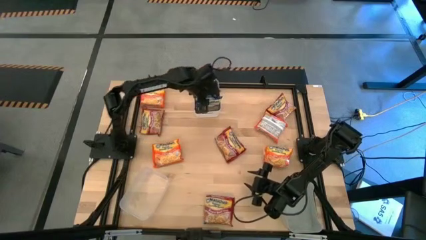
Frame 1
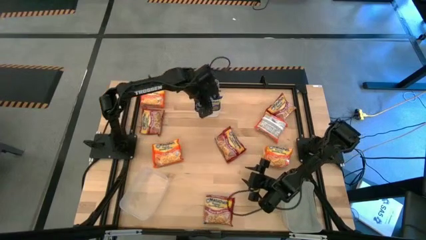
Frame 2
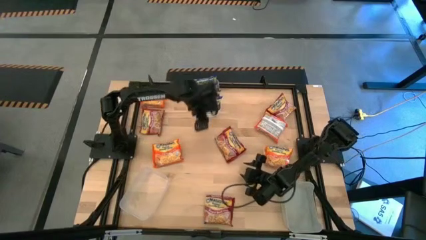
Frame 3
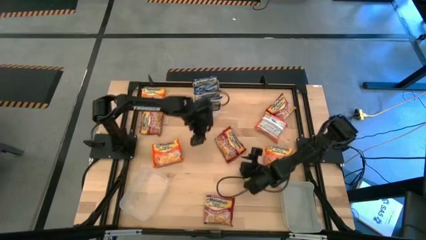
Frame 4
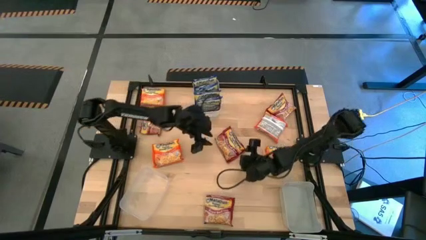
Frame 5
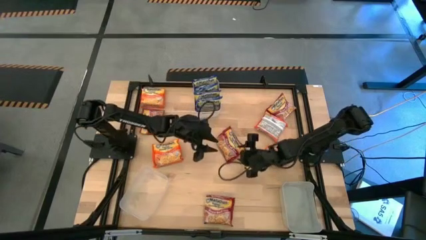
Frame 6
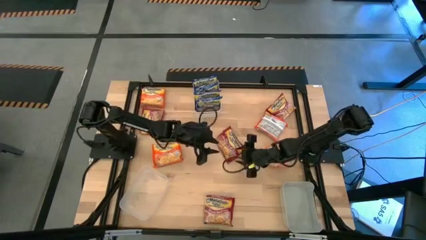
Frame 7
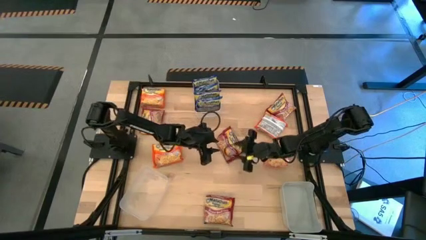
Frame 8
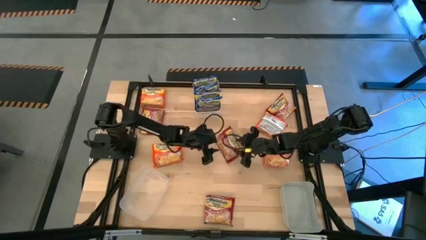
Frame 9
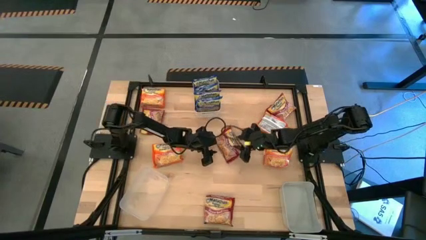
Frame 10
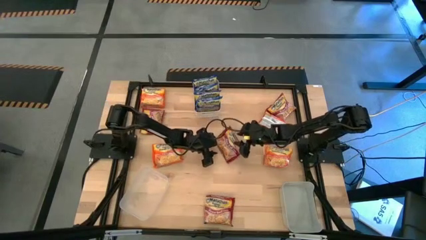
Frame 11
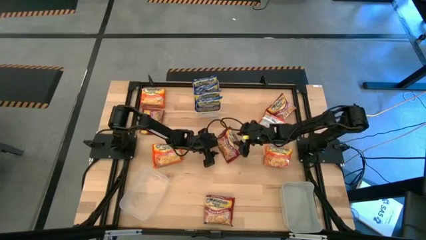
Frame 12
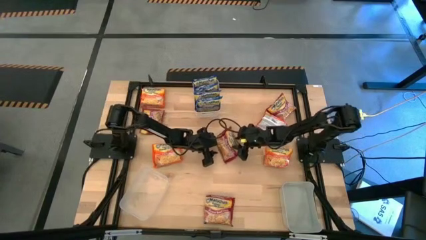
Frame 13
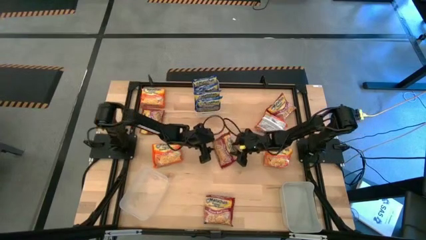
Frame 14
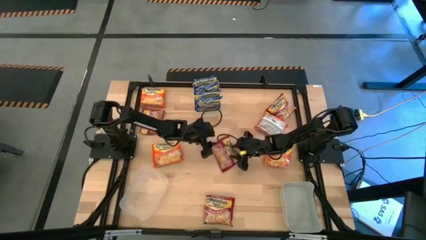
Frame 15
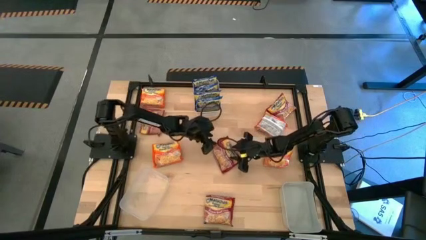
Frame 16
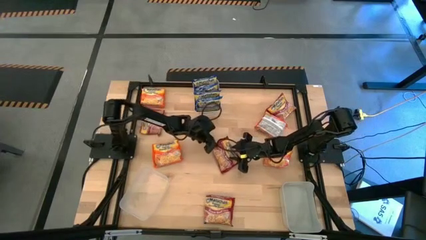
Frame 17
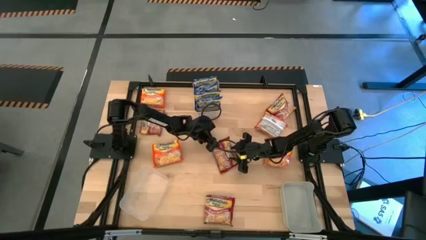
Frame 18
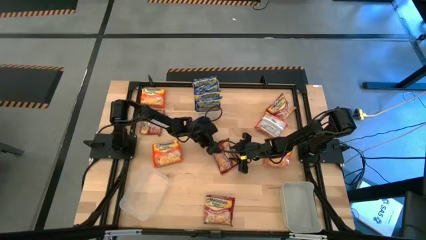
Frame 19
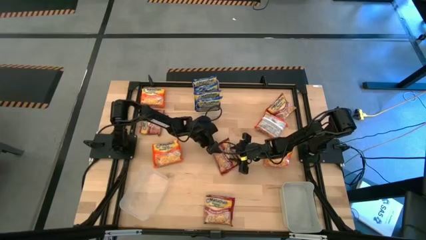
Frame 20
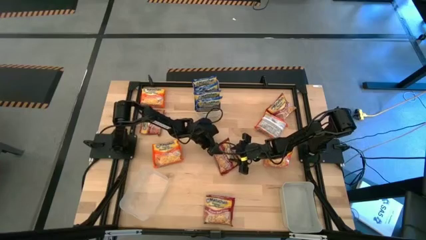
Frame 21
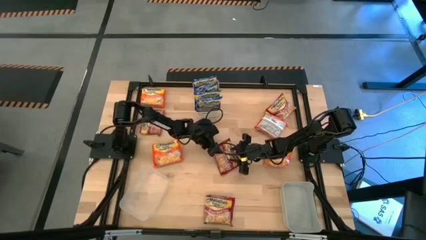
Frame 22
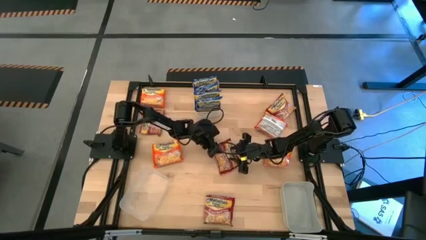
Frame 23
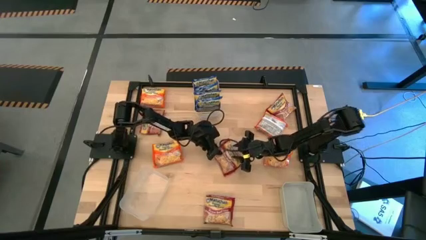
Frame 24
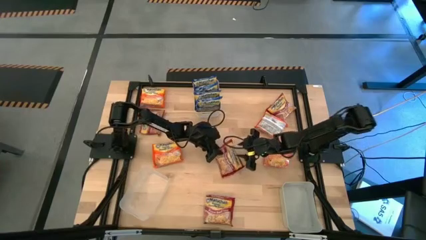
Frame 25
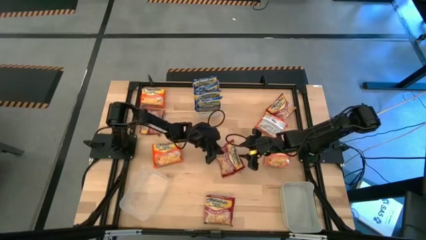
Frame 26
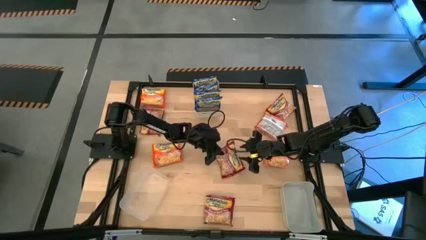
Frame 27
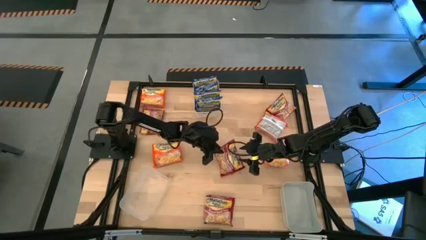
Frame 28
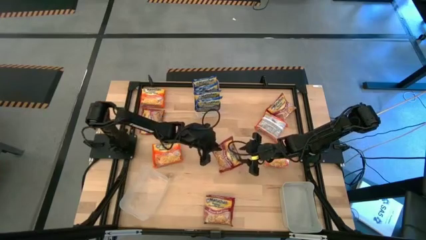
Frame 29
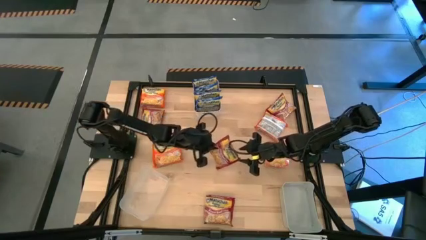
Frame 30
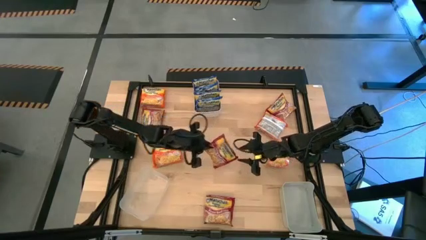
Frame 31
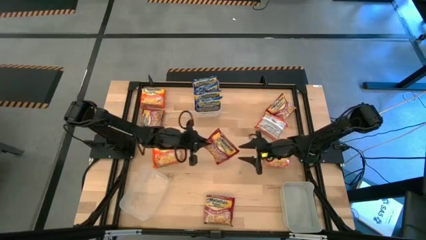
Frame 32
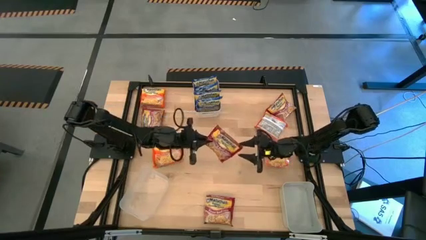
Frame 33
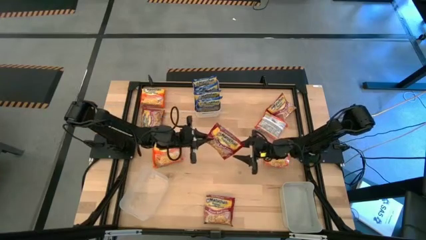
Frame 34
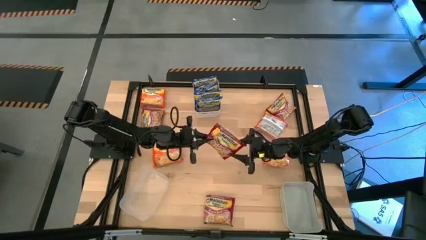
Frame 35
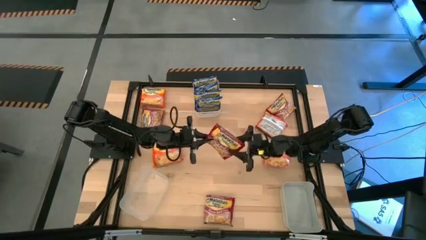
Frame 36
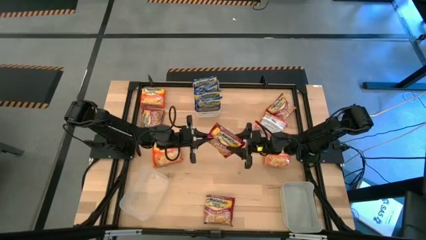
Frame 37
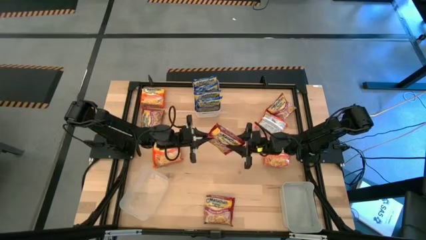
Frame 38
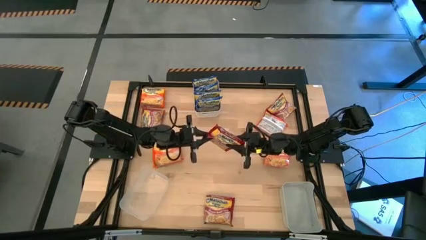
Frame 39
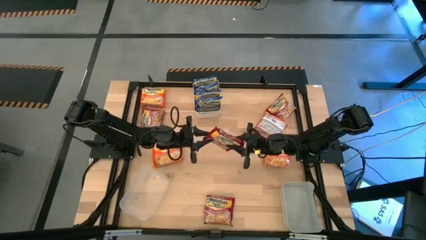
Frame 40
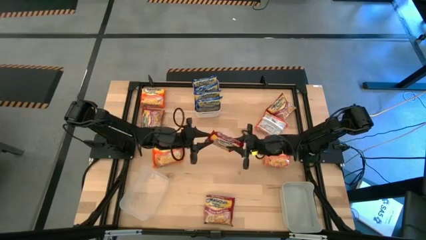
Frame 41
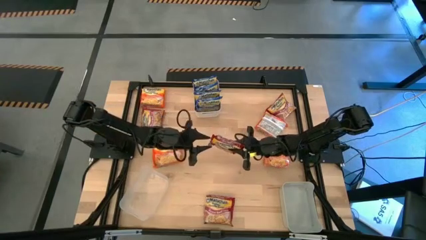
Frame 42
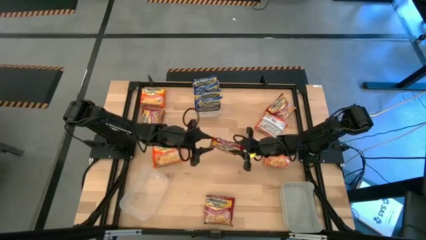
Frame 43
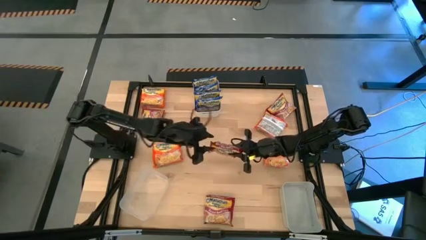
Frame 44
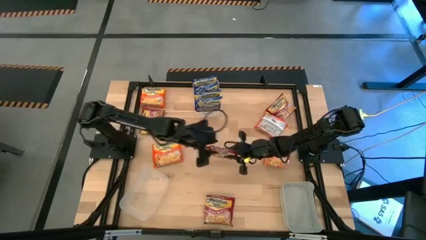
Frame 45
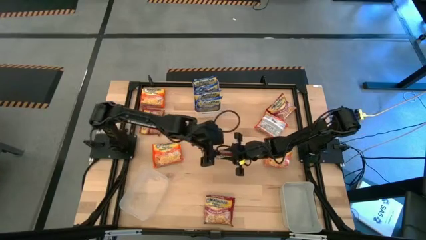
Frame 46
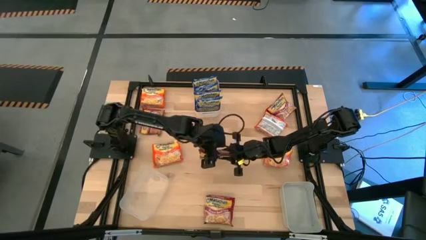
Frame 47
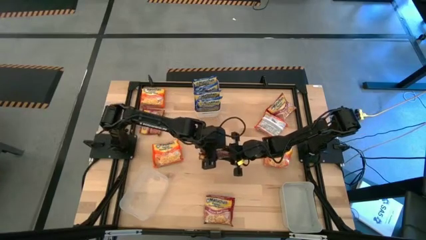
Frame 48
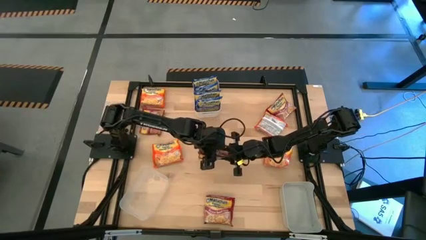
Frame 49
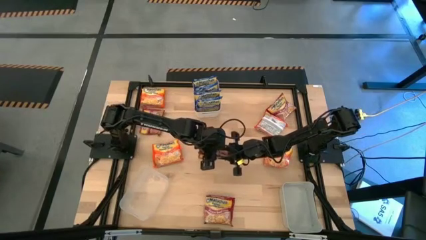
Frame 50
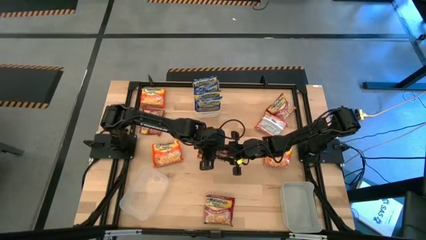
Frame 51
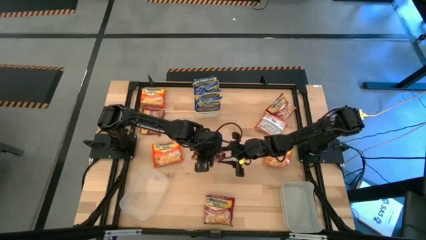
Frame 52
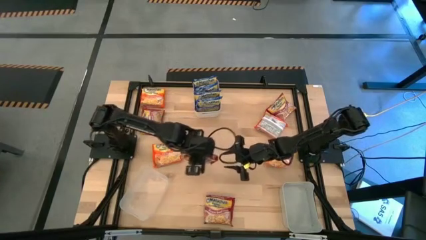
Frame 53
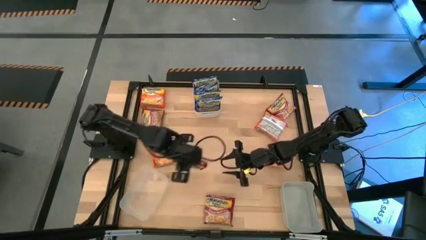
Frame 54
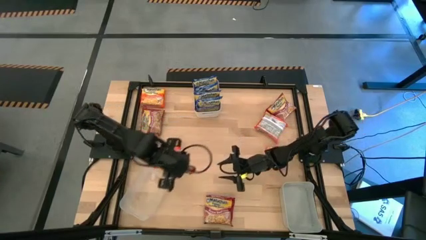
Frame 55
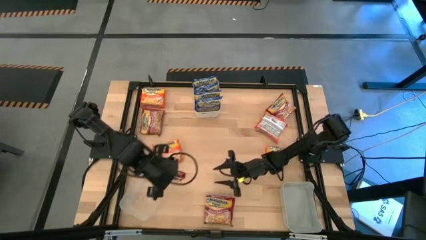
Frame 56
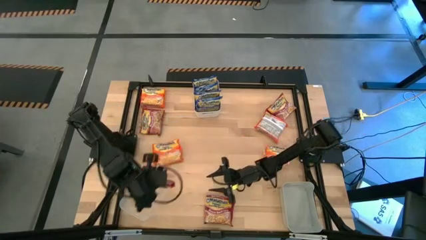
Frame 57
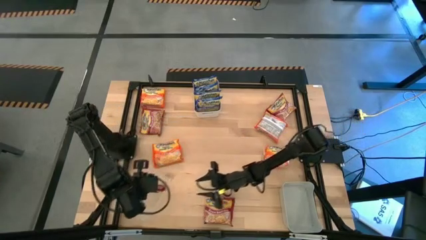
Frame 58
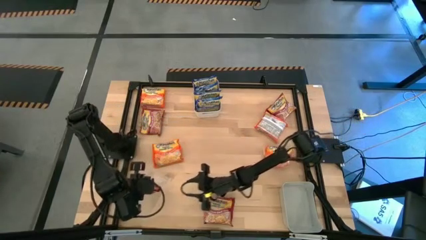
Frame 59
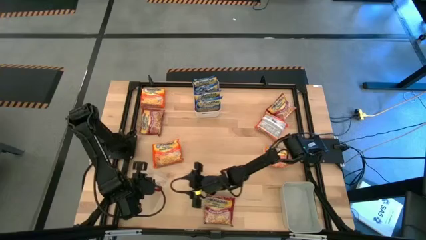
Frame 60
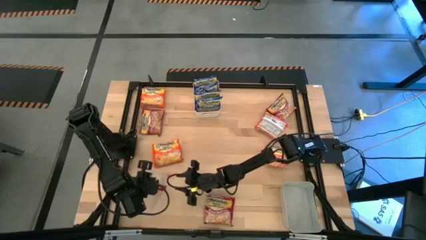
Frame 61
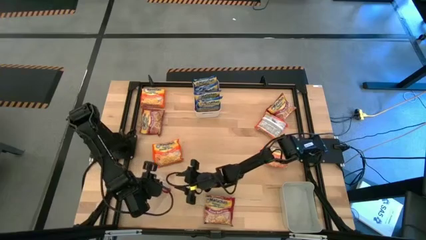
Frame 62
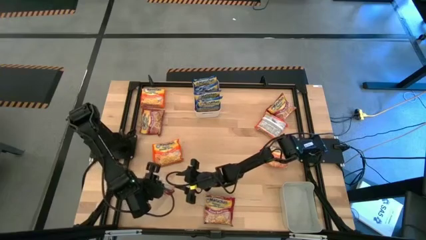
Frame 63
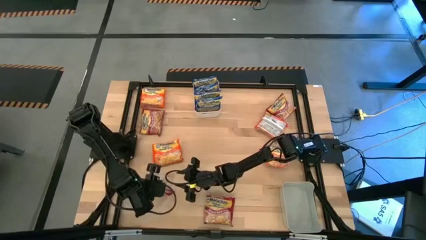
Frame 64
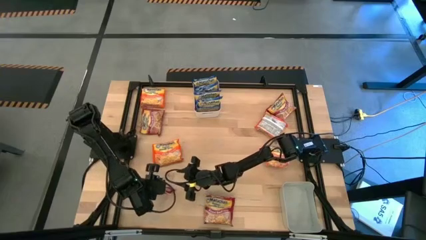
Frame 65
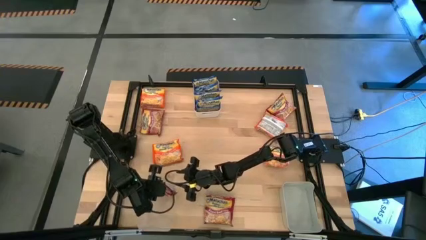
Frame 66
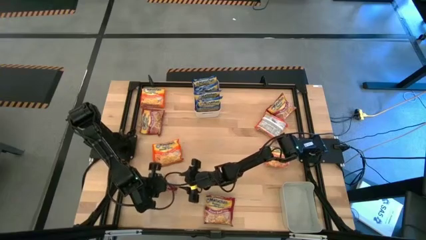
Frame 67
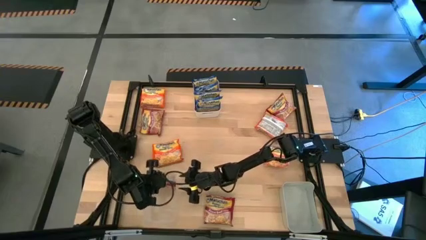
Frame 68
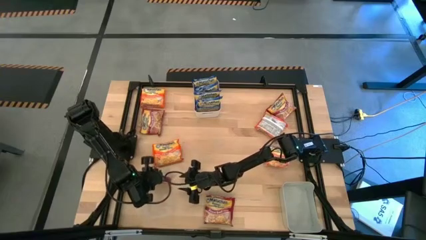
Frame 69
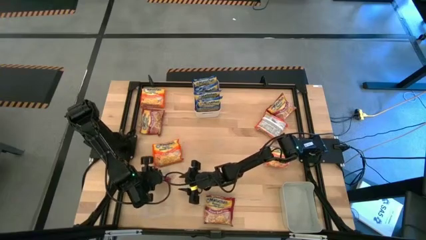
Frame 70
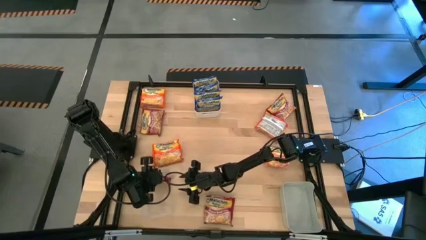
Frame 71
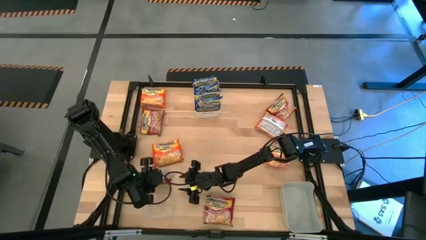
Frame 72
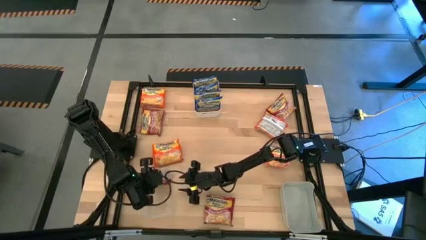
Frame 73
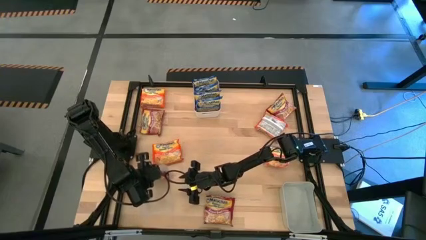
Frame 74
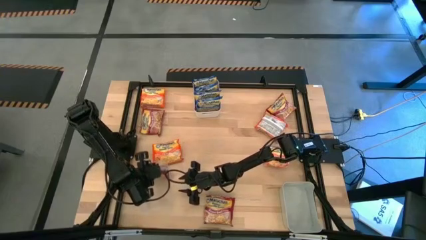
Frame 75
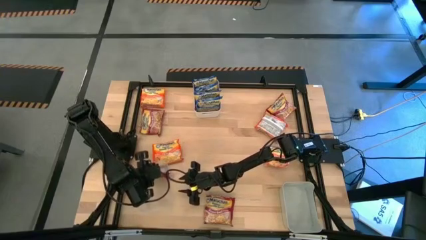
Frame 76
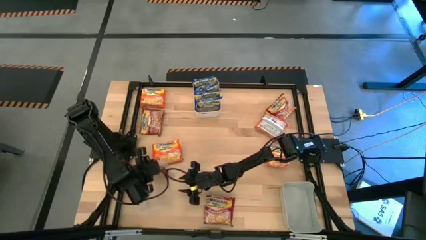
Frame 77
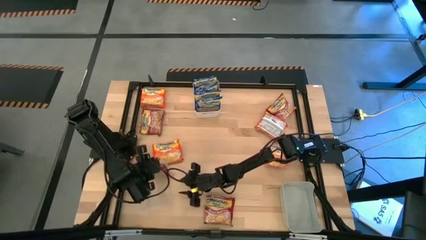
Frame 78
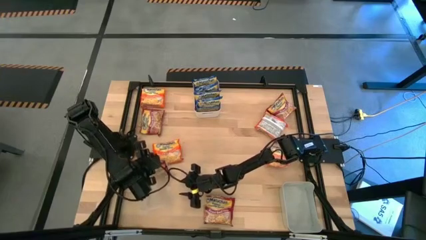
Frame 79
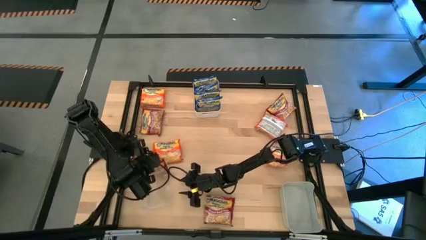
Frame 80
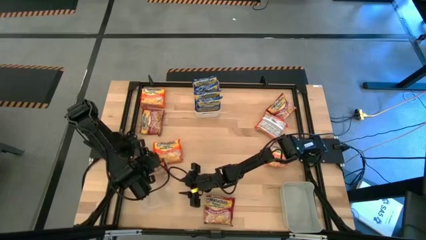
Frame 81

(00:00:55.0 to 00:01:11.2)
Task: Sort Maruchan noodles
Put the red noodle pack into the transparent bin
